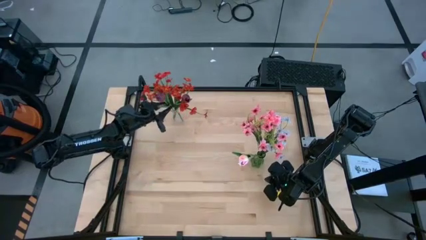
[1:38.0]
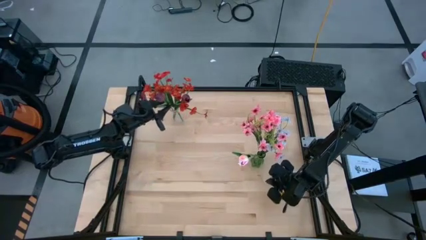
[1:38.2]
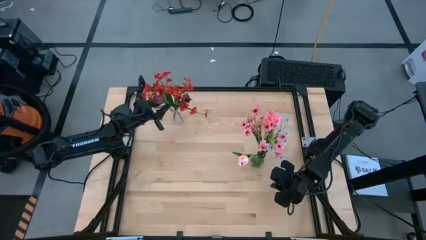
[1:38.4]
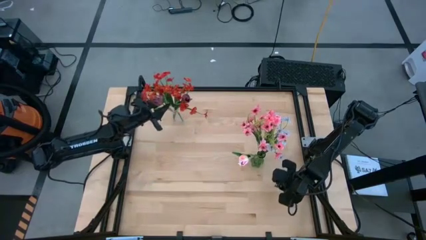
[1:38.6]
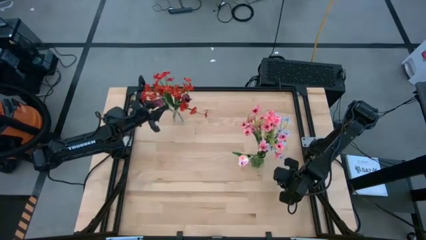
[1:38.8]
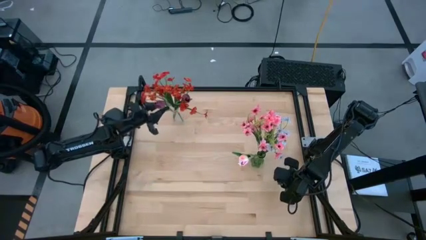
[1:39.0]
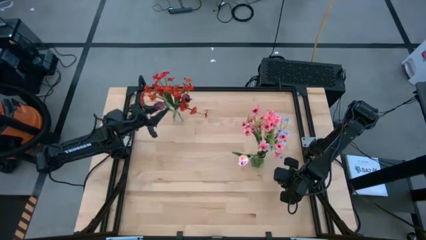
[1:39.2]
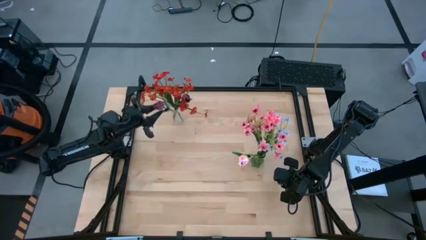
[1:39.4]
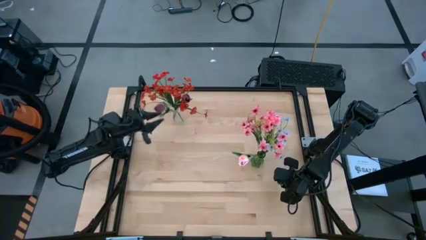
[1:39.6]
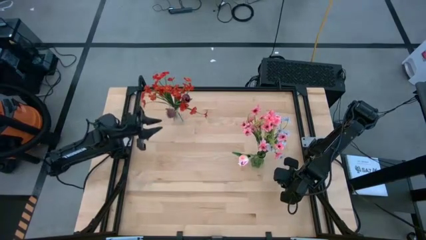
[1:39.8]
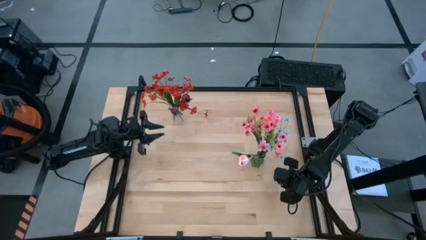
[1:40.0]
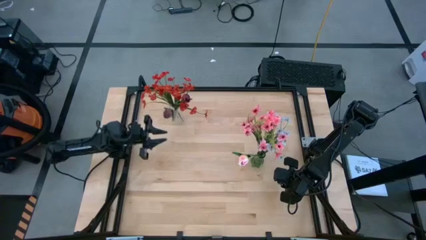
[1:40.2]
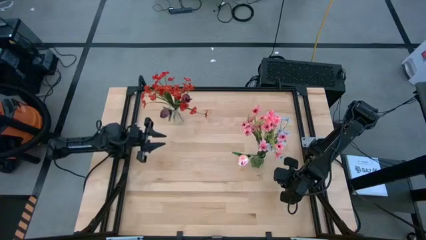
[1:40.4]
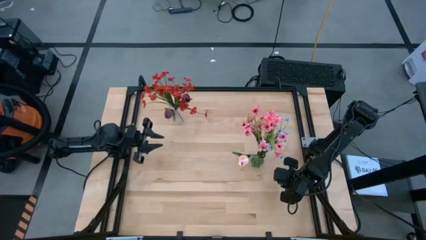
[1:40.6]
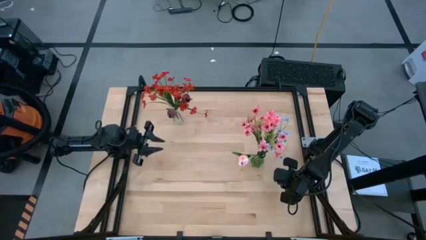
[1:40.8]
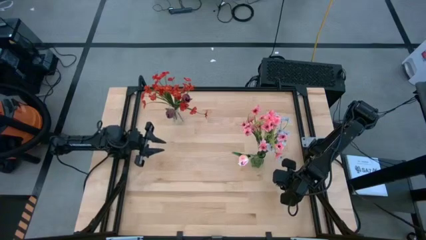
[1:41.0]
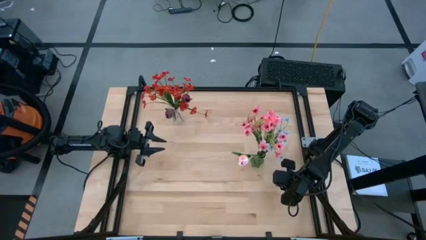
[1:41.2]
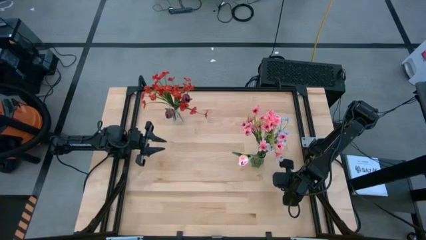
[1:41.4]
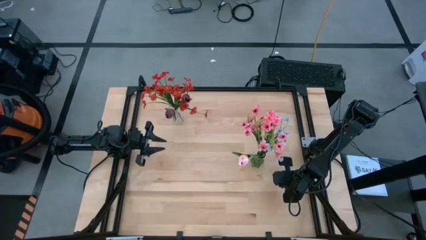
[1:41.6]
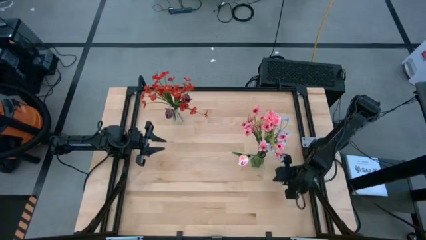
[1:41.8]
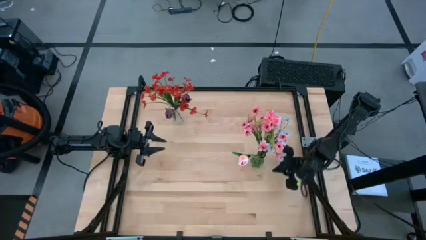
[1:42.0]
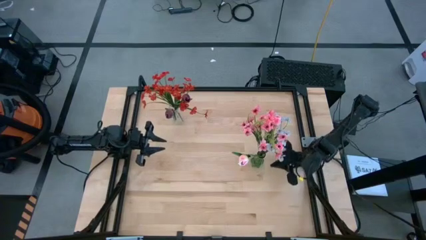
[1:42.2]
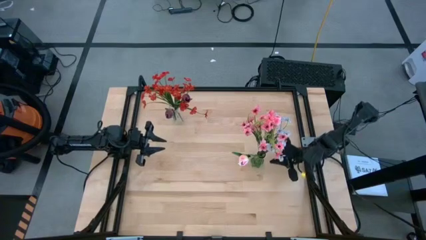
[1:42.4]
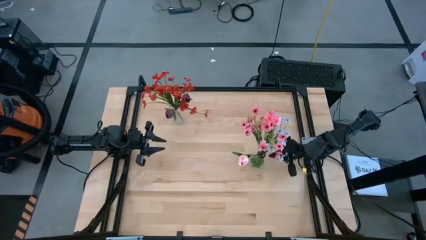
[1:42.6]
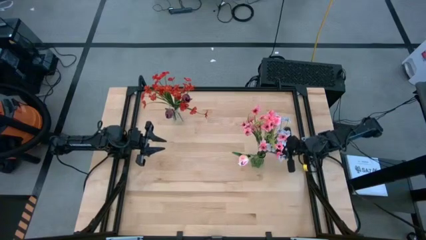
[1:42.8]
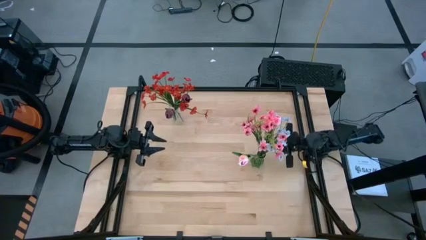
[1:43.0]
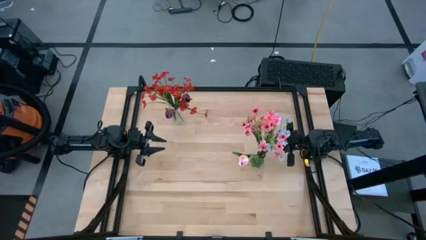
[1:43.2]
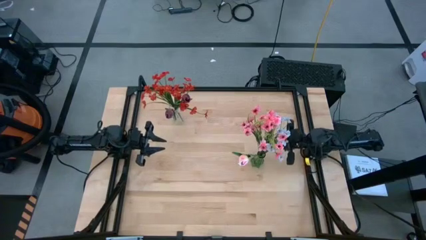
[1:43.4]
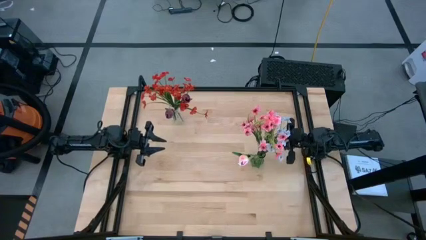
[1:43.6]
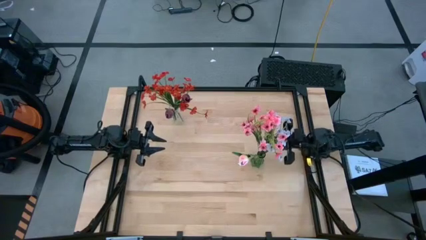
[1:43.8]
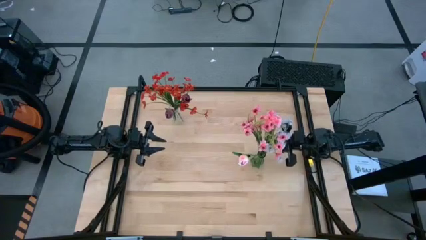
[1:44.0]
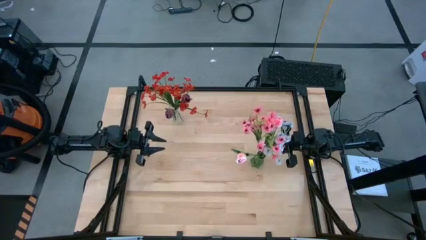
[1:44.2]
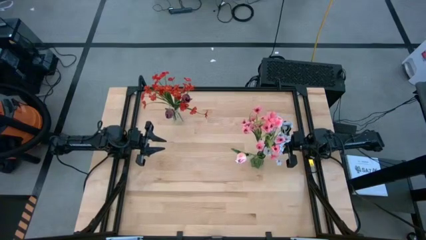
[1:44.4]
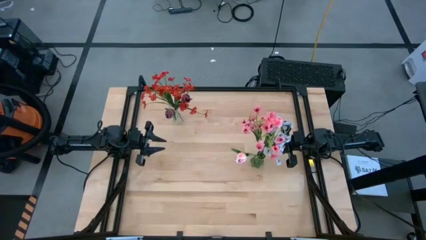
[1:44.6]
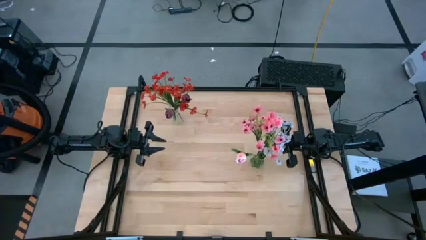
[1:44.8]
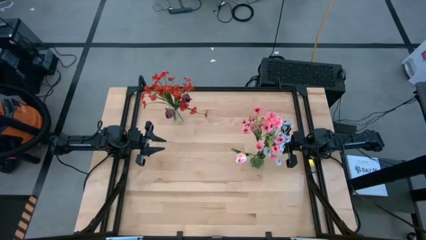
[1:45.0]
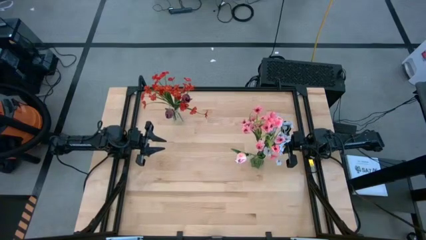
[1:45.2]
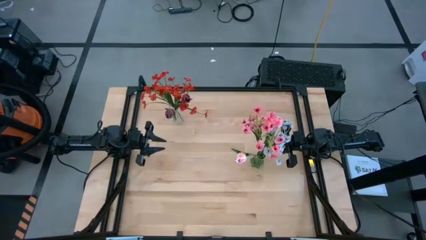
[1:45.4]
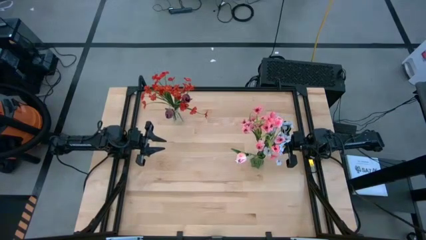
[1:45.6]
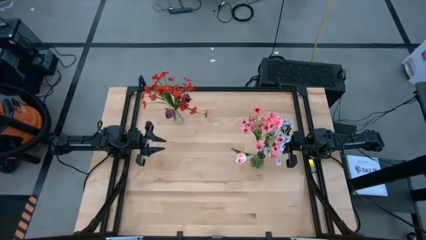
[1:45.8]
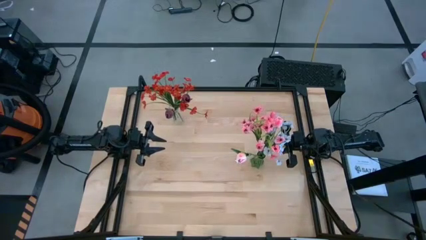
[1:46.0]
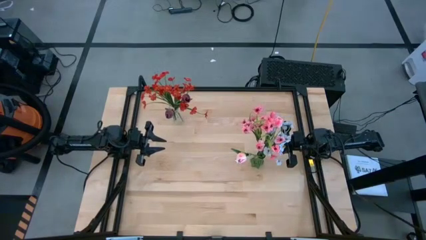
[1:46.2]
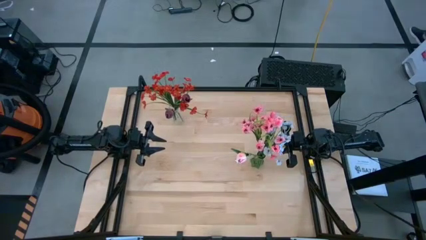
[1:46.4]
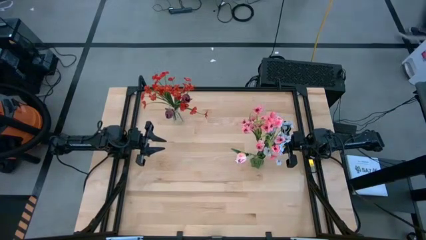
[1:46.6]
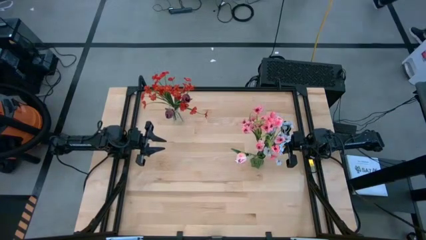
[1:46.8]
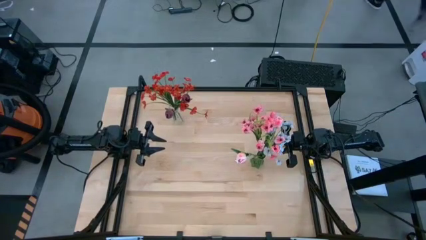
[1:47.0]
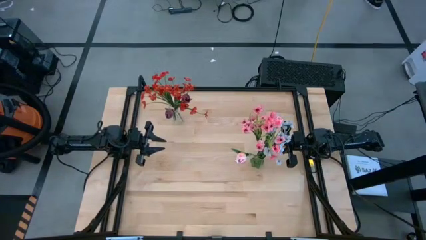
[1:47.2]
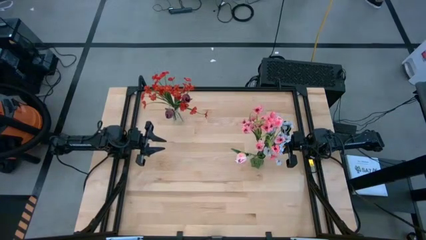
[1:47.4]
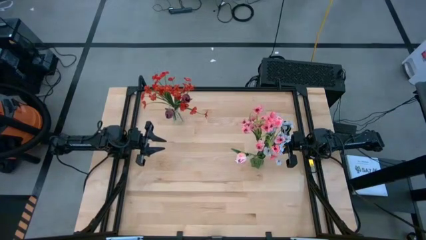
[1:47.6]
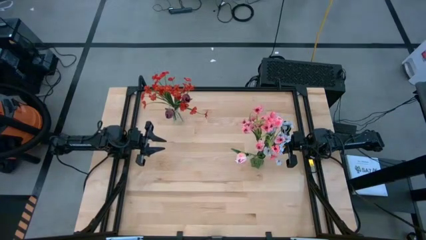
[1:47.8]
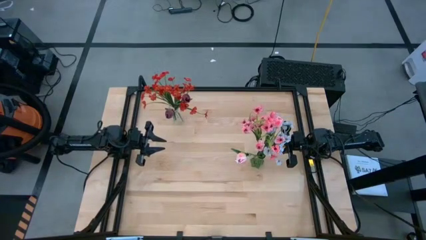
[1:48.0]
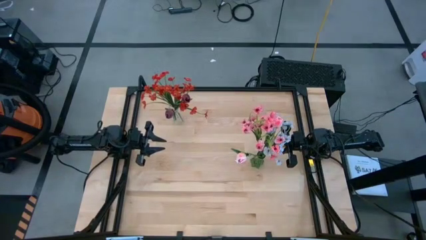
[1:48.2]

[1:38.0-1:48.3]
Task: Sort flowers into vase by color
Return to Home Position

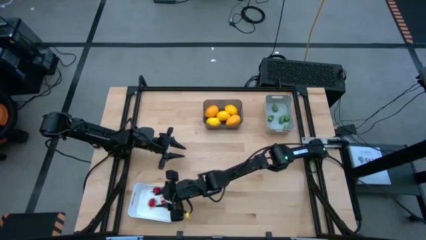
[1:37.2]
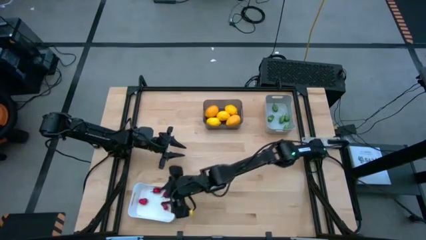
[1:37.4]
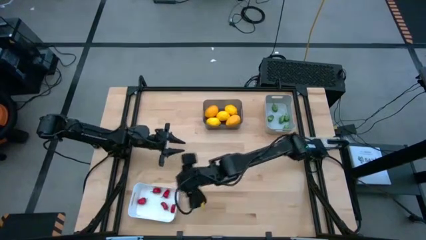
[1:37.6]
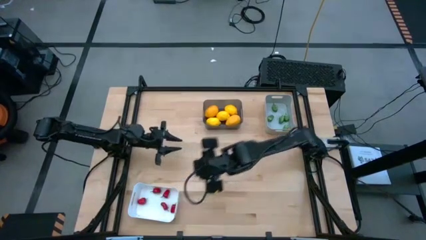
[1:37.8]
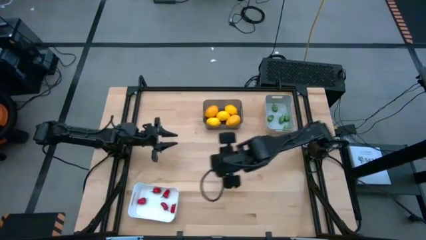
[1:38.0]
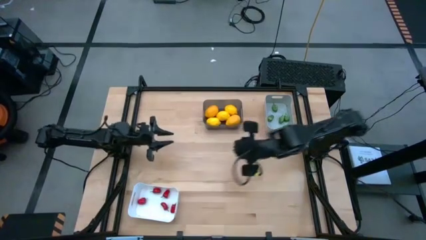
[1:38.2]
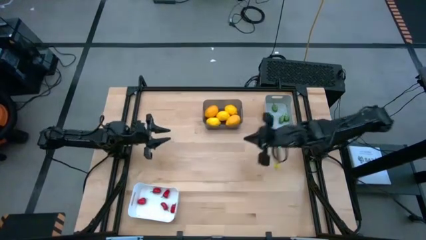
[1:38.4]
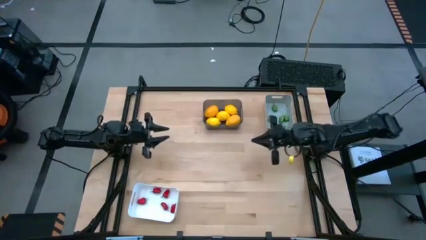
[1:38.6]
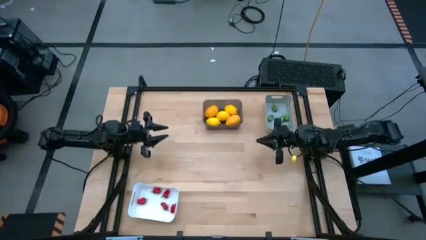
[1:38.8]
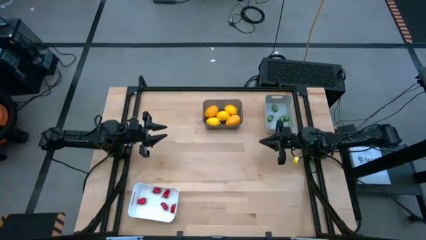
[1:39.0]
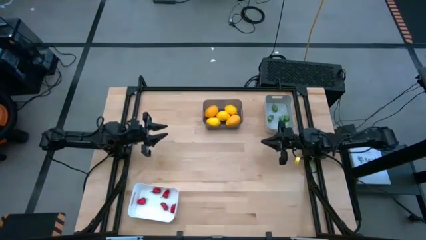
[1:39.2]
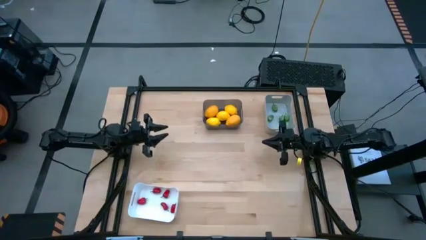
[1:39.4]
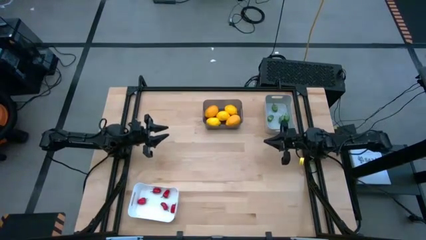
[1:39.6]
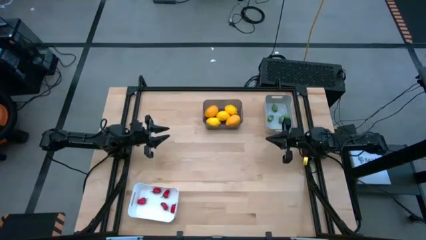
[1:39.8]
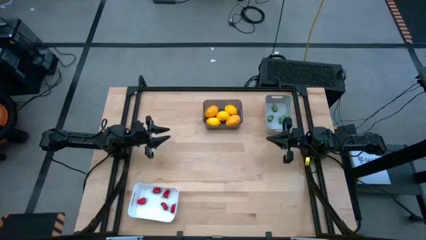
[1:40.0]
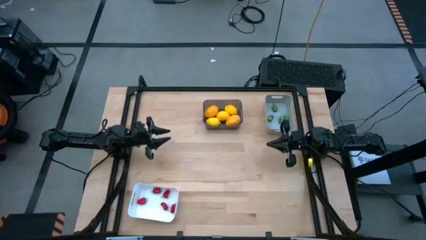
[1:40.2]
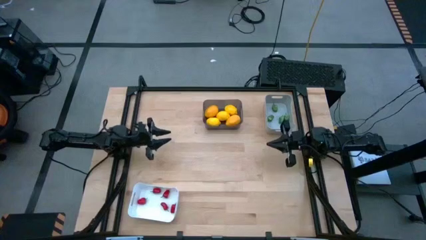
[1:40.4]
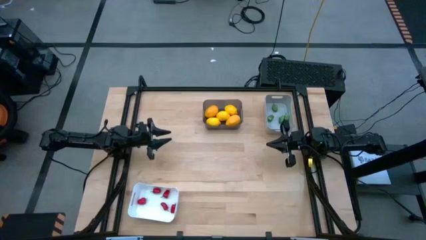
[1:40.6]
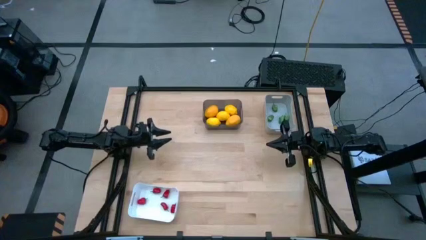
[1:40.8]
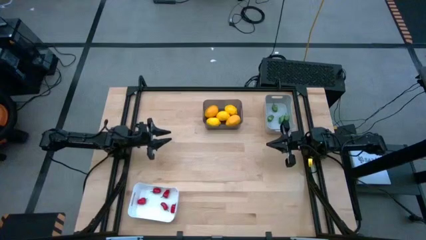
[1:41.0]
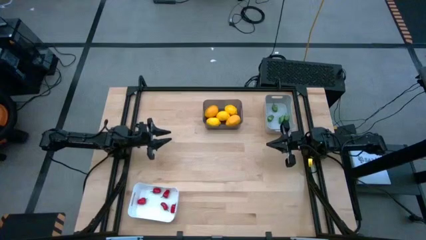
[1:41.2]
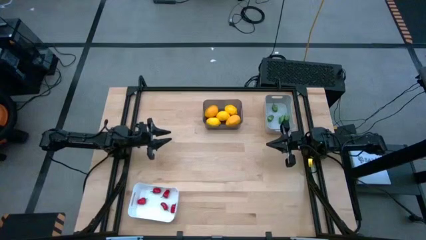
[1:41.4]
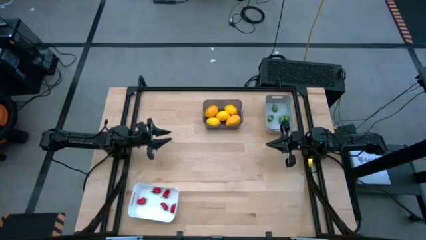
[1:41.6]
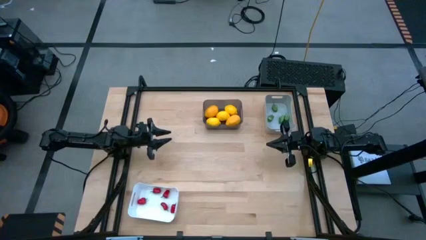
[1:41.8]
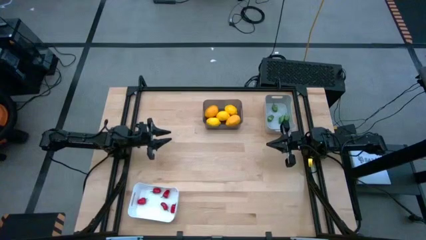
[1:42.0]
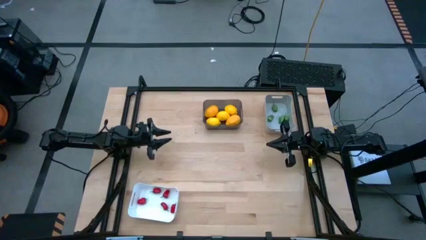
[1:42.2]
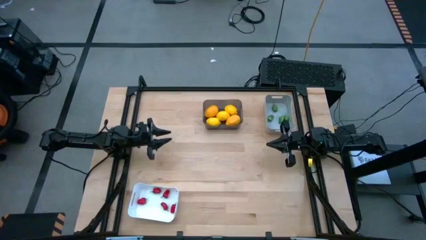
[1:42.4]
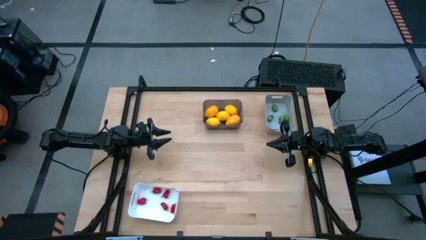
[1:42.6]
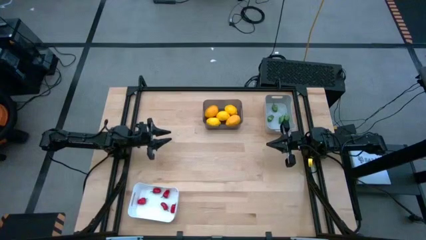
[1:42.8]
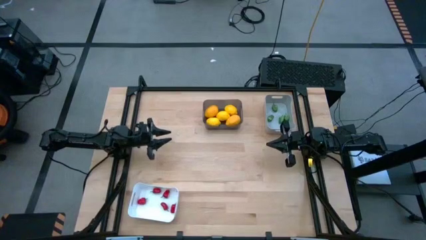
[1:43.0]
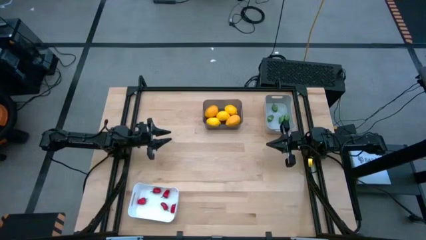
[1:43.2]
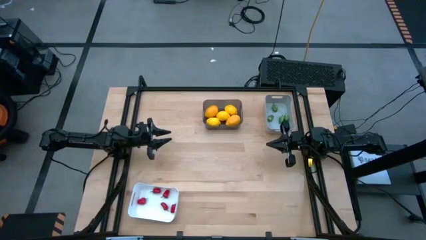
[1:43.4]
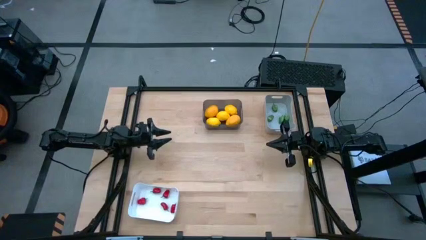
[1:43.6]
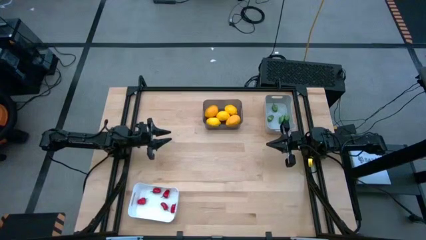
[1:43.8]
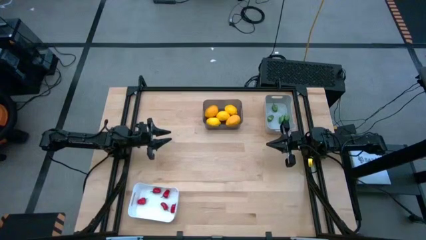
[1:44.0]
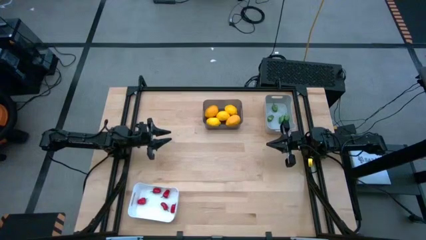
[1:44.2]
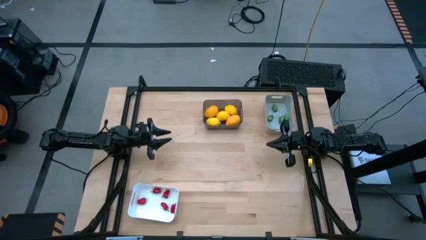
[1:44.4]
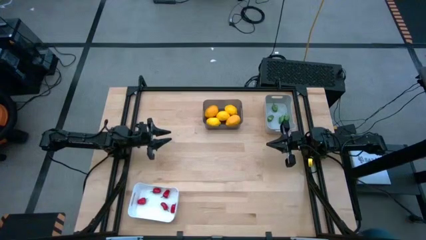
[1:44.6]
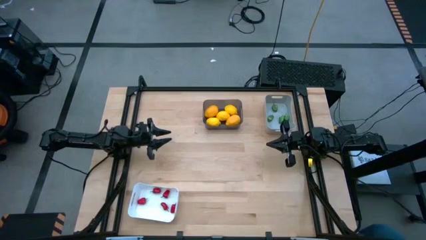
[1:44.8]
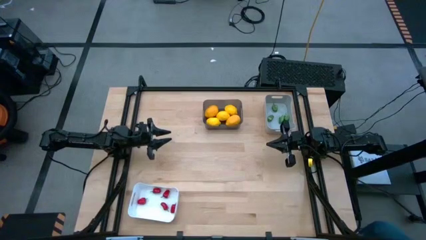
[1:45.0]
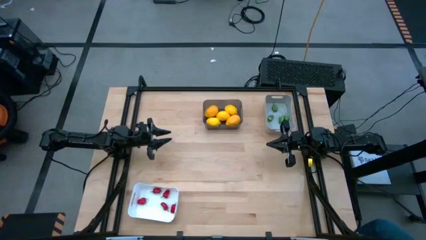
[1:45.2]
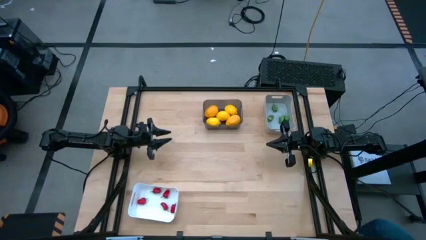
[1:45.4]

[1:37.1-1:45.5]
Task: Sort produce into baskets
Return to Home Position
